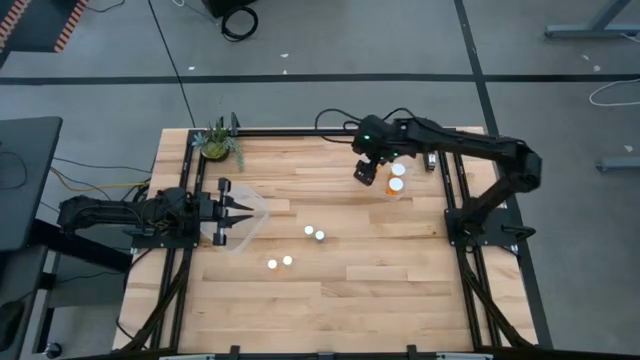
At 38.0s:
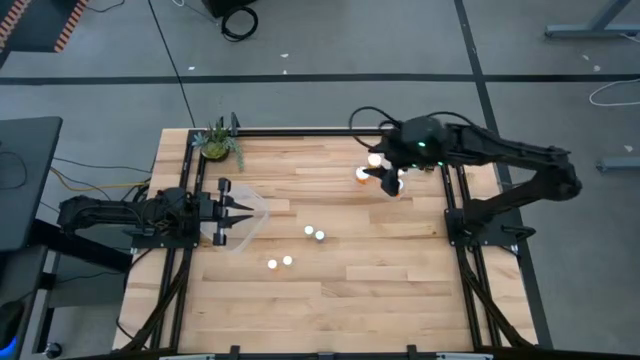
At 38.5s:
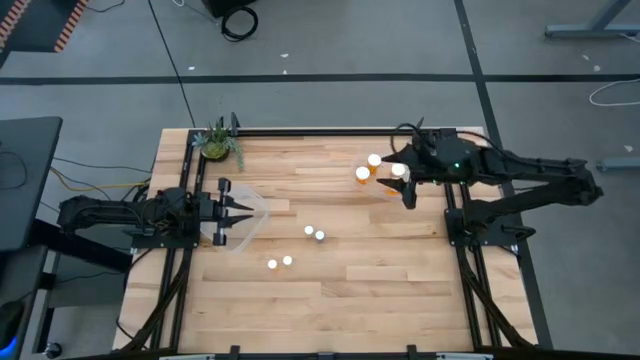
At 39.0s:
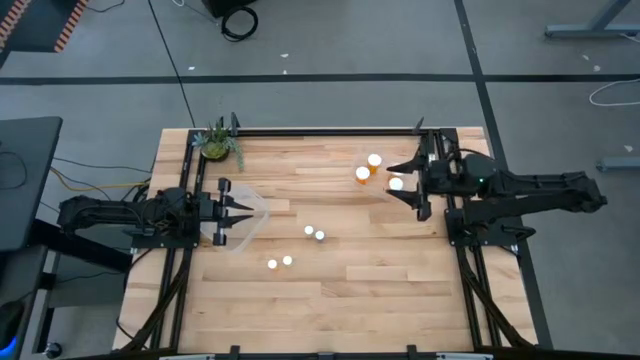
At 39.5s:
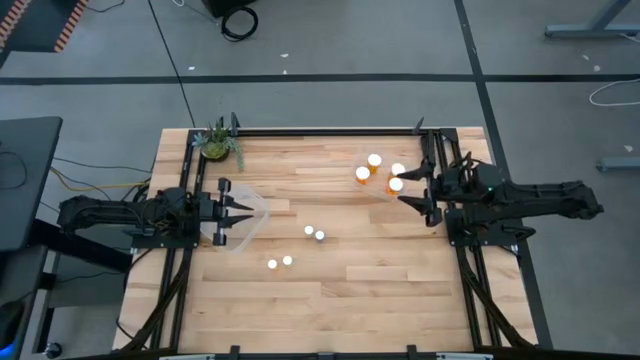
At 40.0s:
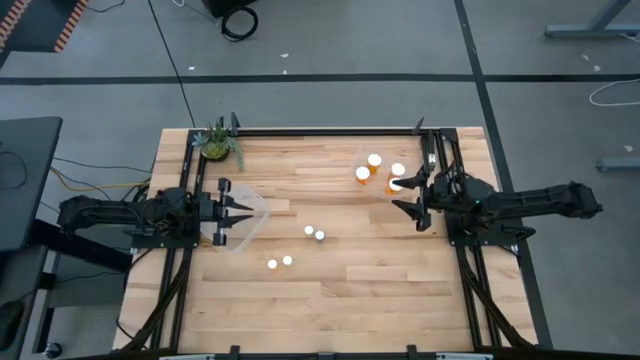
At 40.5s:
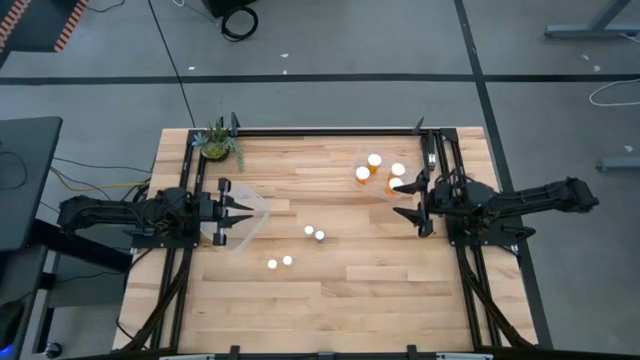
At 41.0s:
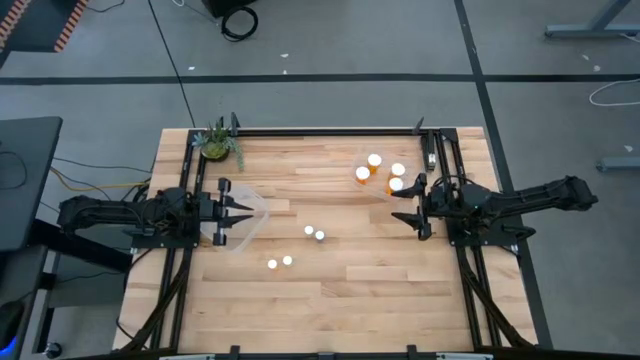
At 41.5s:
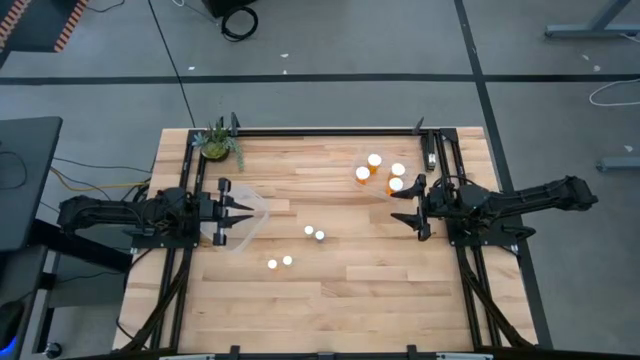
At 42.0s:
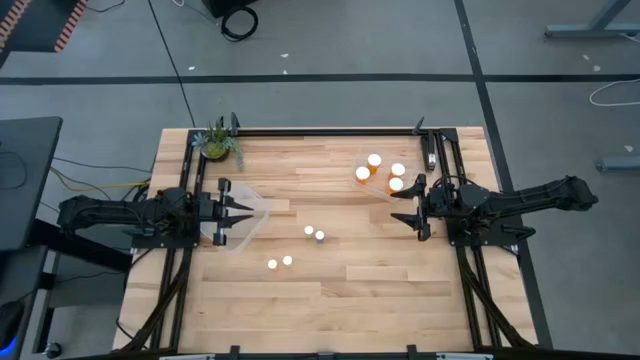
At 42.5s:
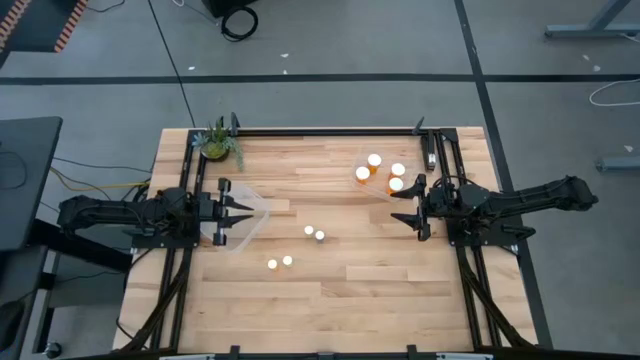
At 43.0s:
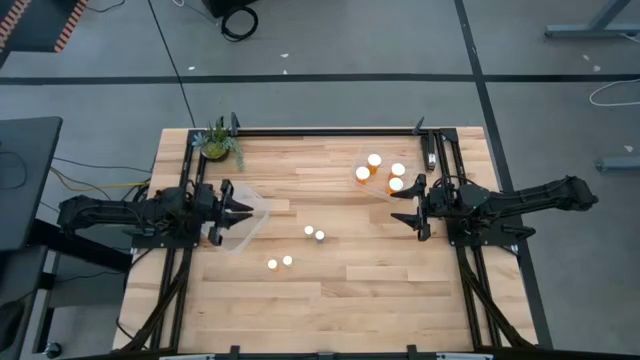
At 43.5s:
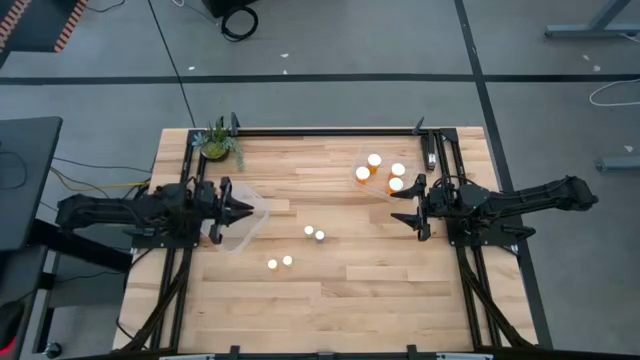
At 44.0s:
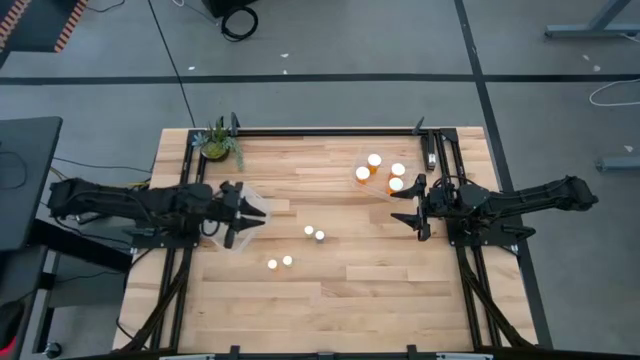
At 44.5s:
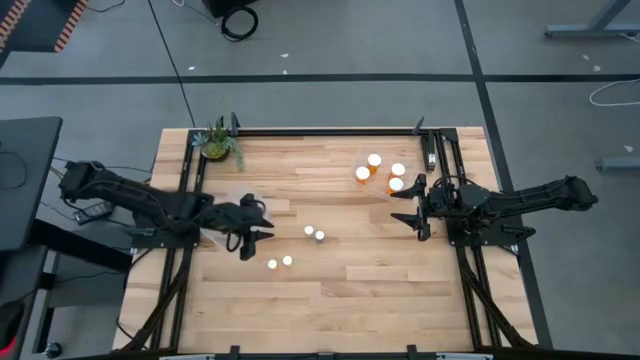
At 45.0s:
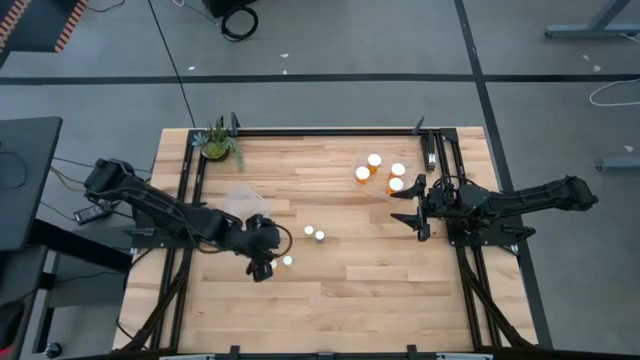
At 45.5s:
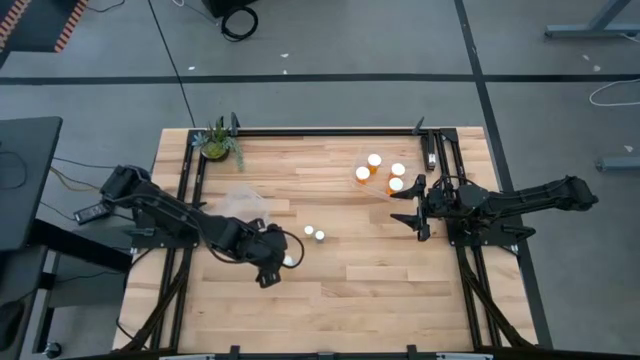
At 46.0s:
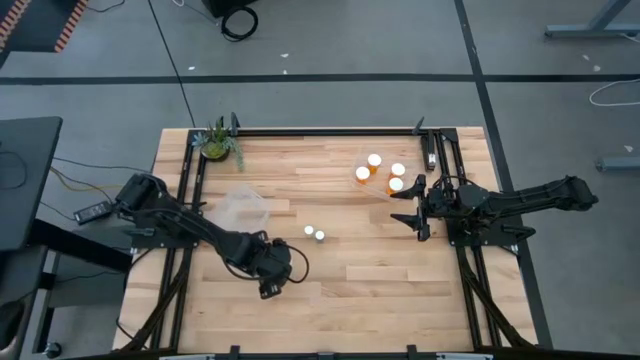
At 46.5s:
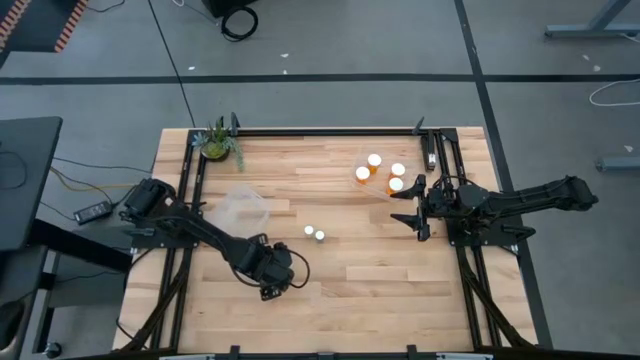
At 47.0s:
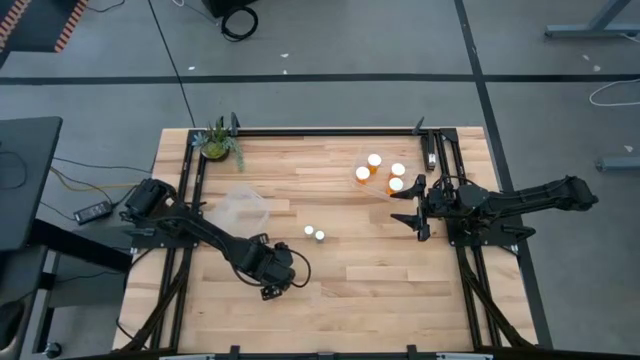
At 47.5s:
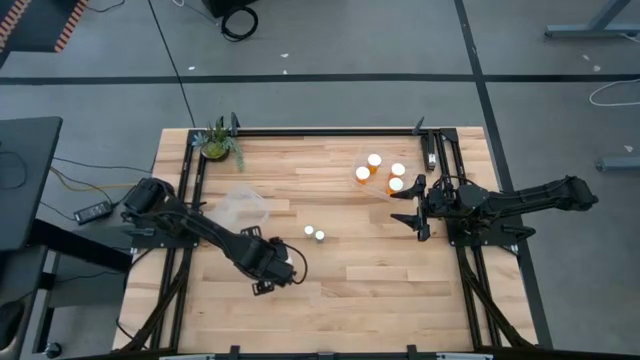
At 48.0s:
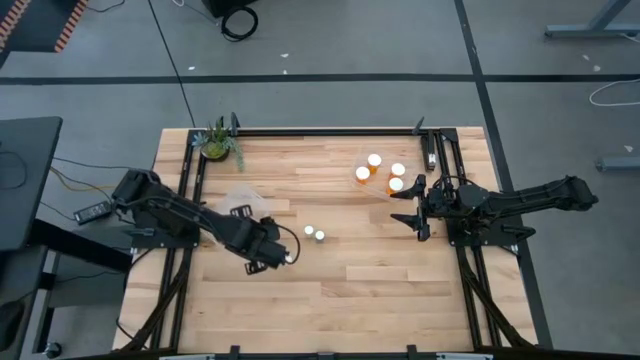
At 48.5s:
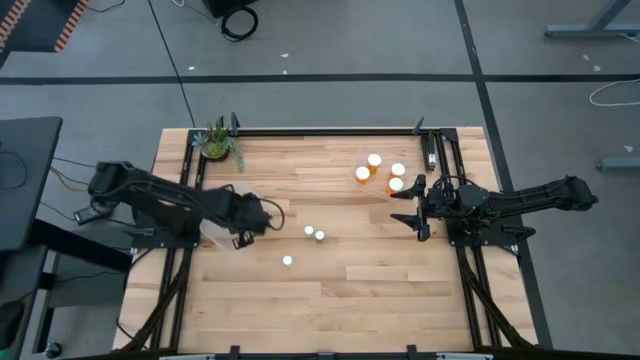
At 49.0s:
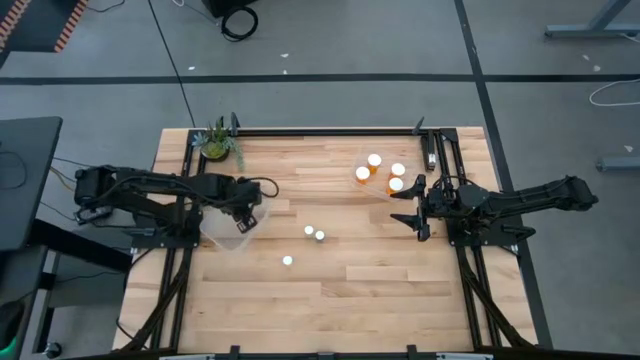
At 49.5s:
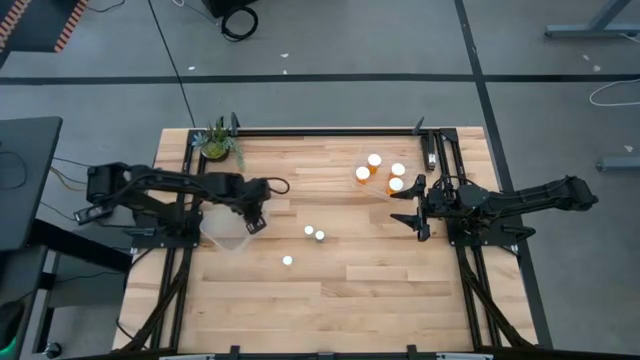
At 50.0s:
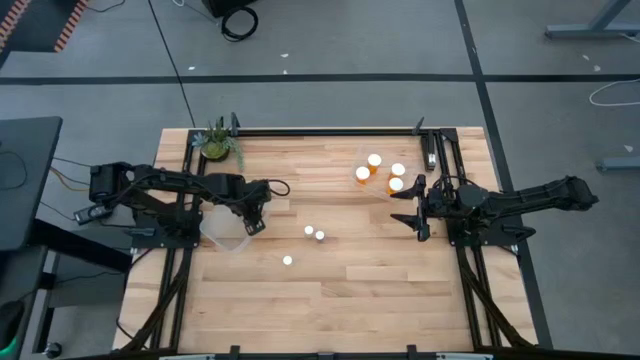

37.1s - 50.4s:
Task: Pick and place medicine bottles into bin by pill shape (circle, oval)
Put the small orange pill bottle into the left transparent bin

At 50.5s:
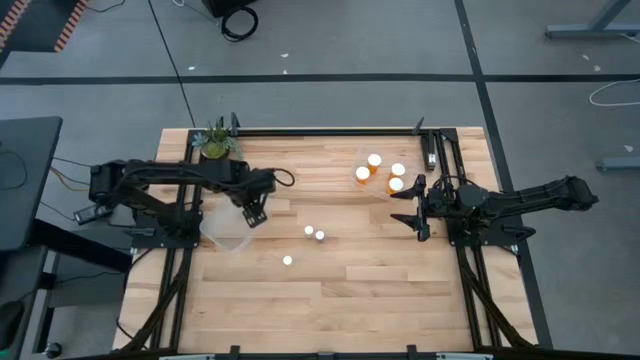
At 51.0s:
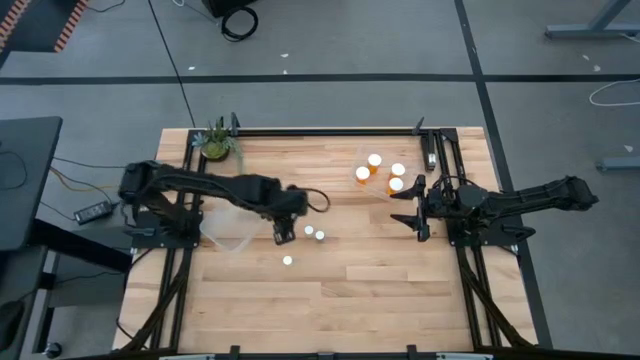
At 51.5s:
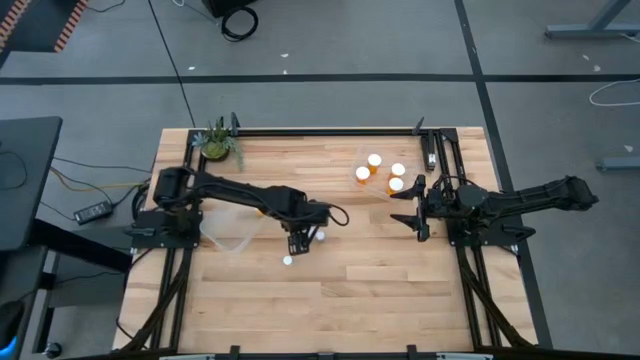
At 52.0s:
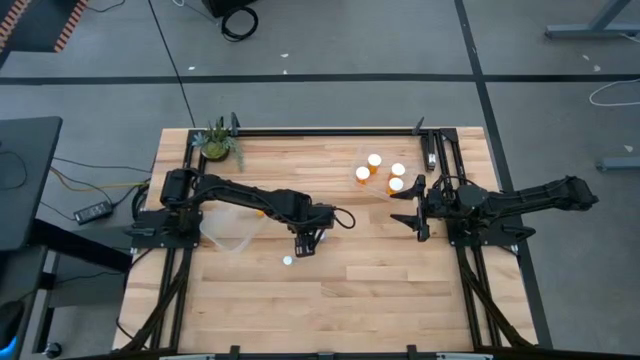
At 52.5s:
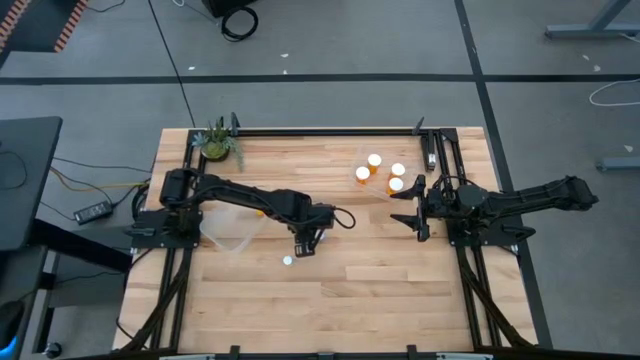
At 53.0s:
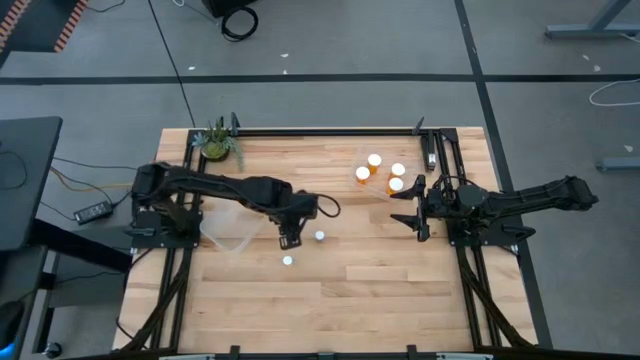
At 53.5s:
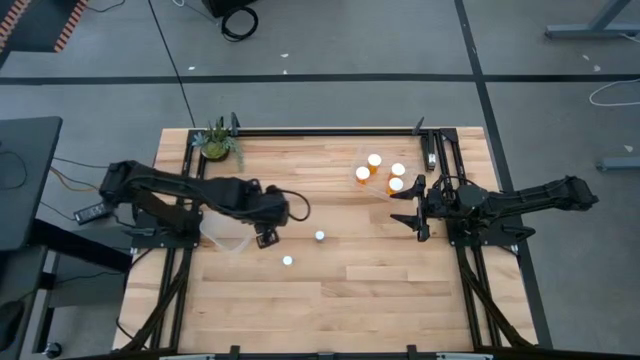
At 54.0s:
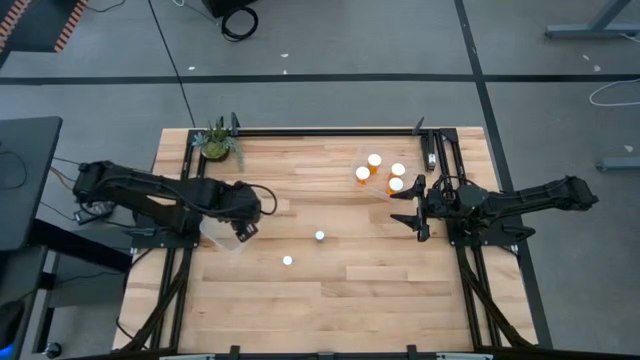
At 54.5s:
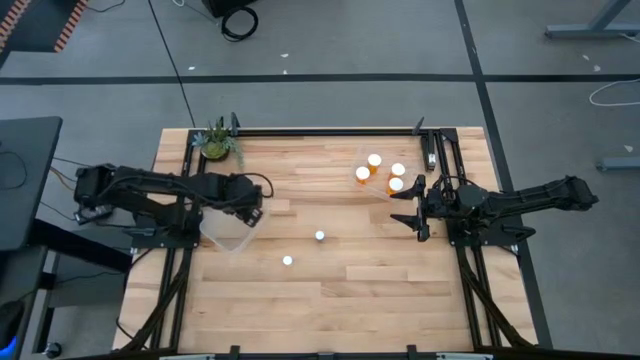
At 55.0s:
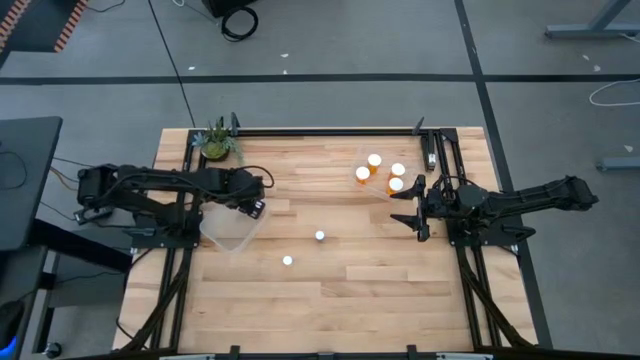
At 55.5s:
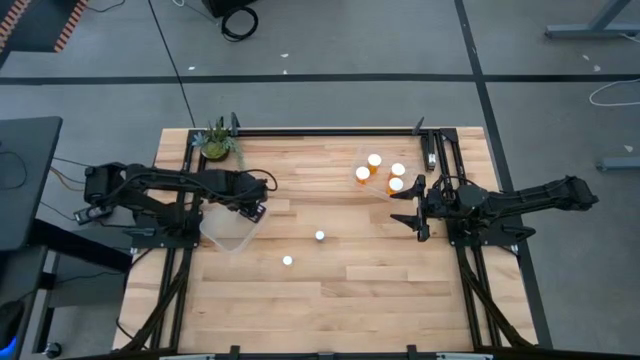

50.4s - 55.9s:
Put the small yellow pill bottle into the left transparent bin

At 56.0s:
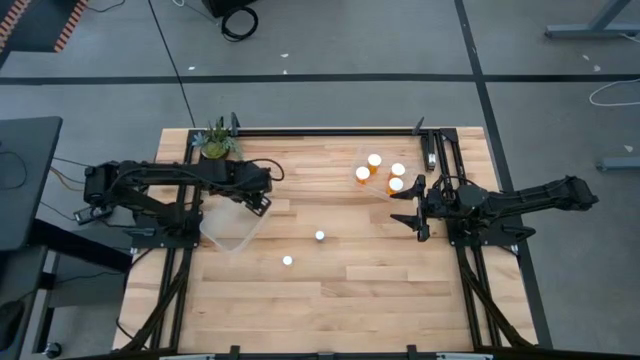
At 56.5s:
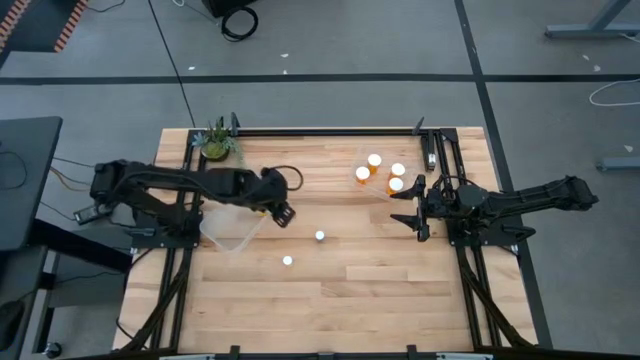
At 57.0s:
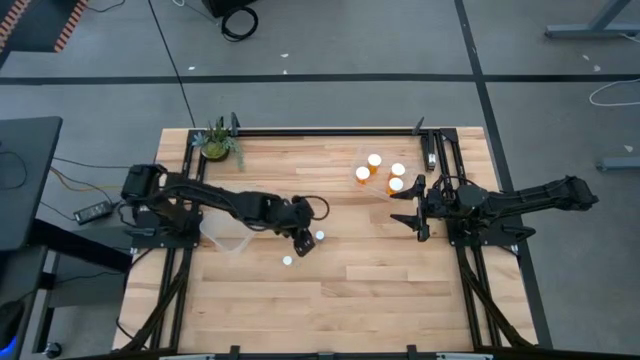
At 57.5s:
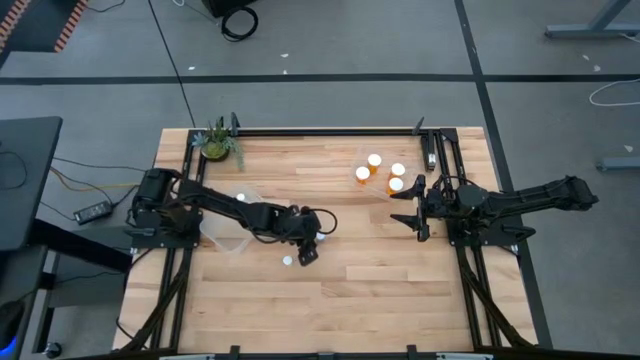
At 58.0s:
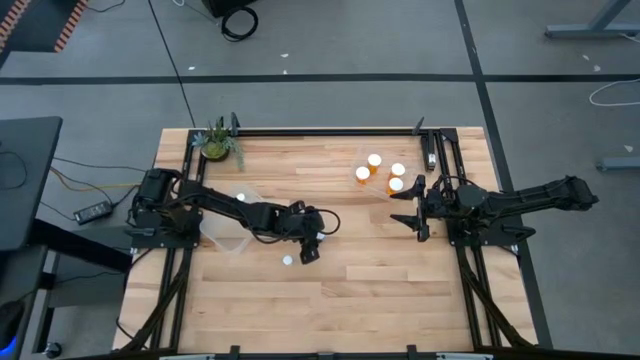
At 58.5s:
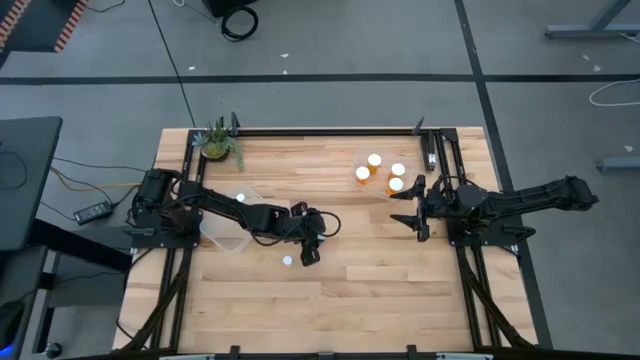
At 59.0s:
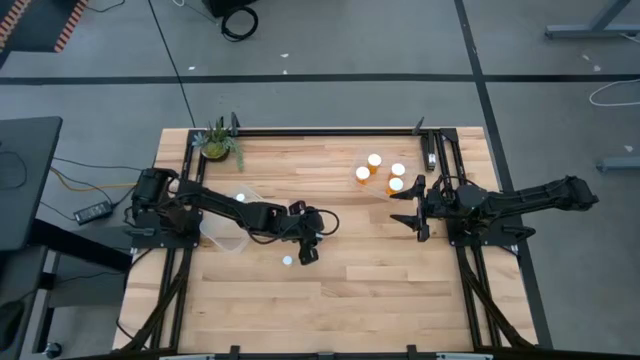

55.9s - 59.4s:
Put the small blue pill bottle into the left transparent bin
